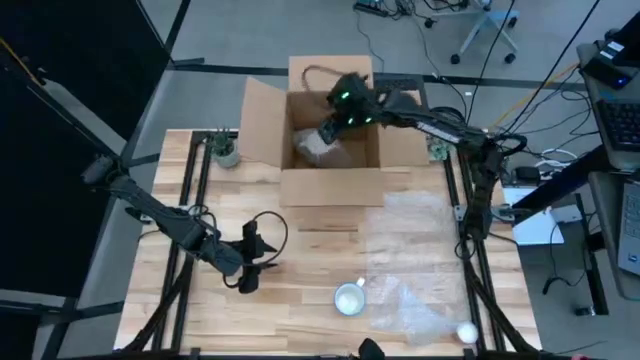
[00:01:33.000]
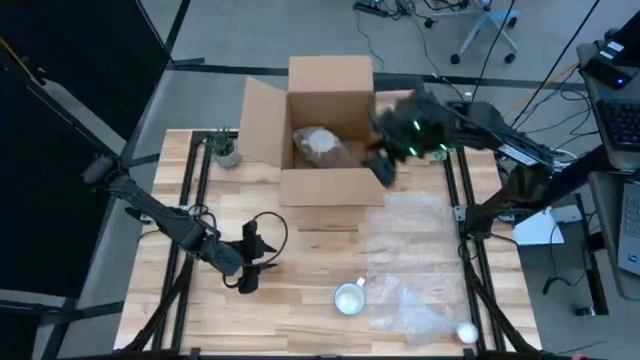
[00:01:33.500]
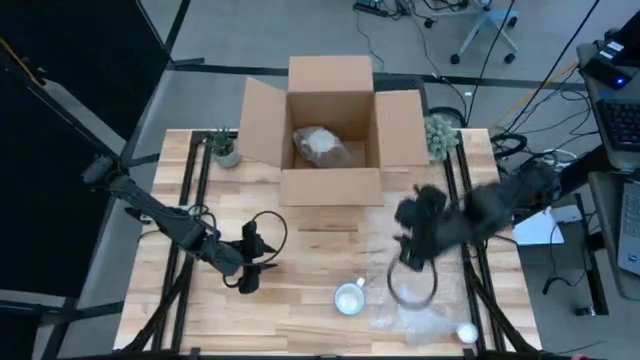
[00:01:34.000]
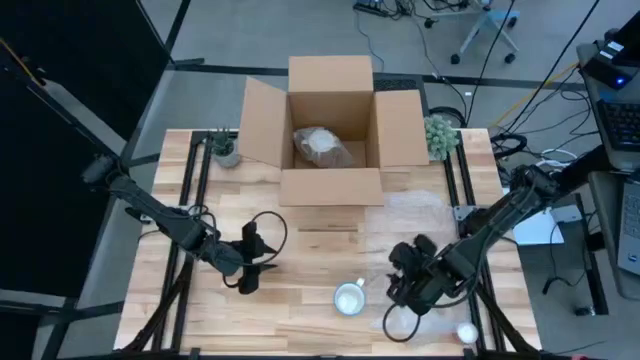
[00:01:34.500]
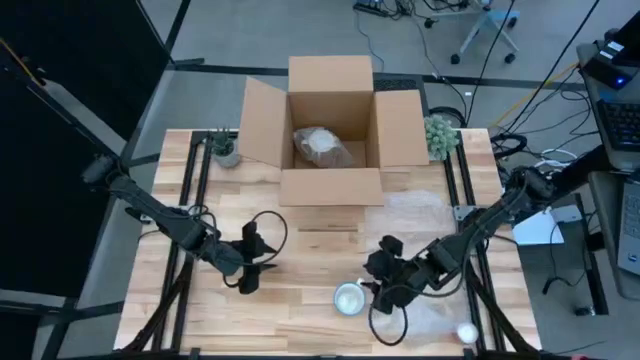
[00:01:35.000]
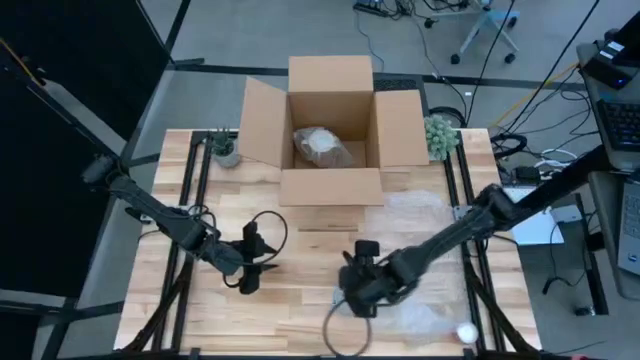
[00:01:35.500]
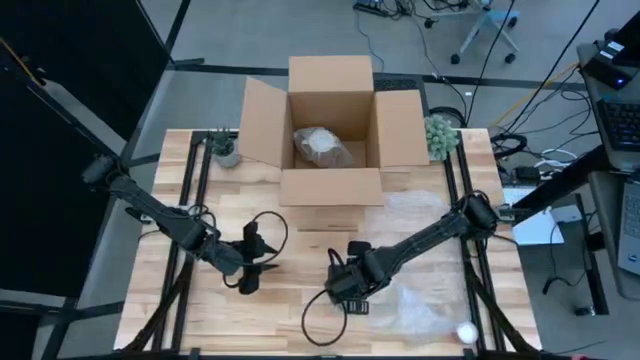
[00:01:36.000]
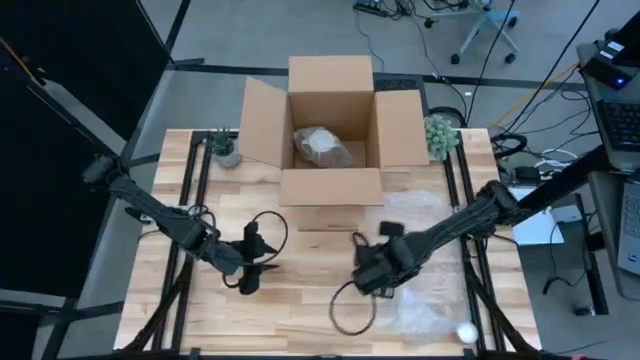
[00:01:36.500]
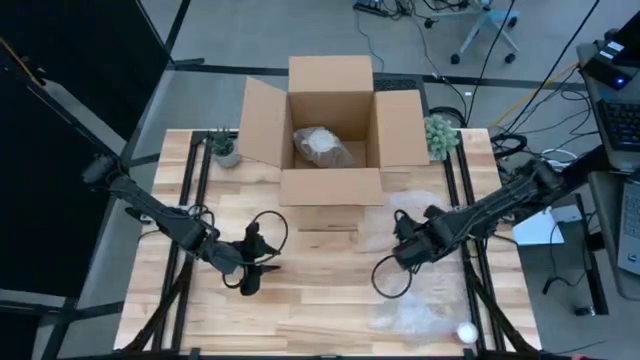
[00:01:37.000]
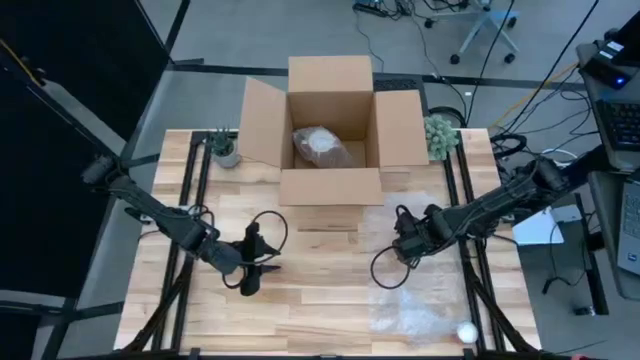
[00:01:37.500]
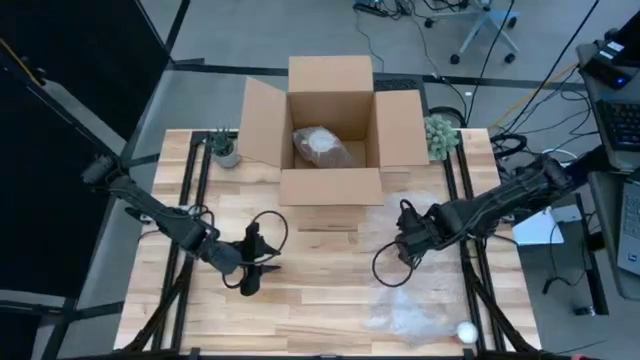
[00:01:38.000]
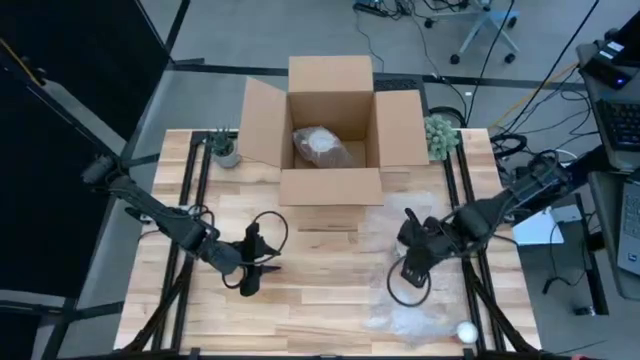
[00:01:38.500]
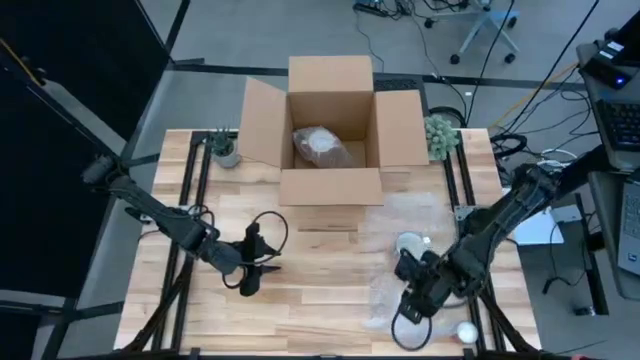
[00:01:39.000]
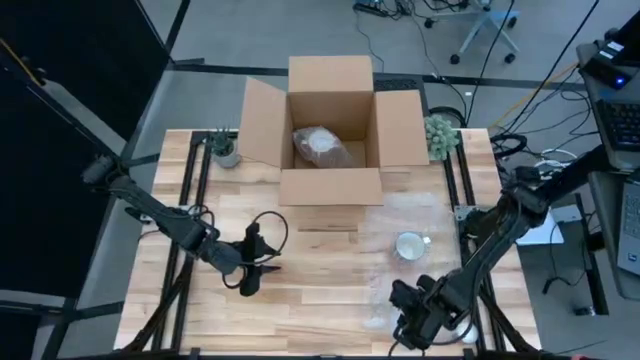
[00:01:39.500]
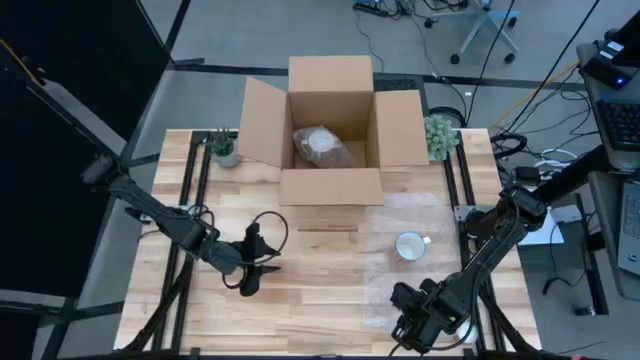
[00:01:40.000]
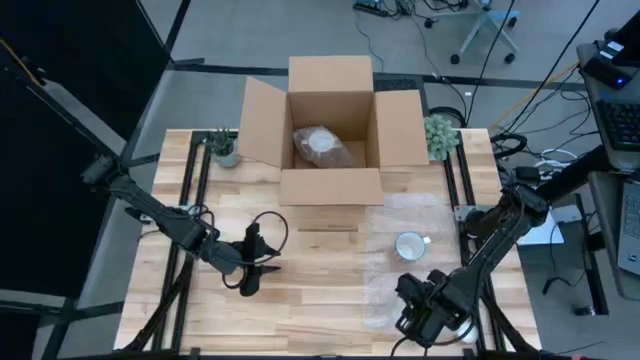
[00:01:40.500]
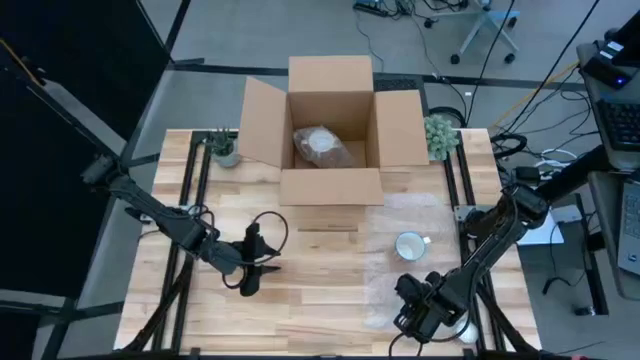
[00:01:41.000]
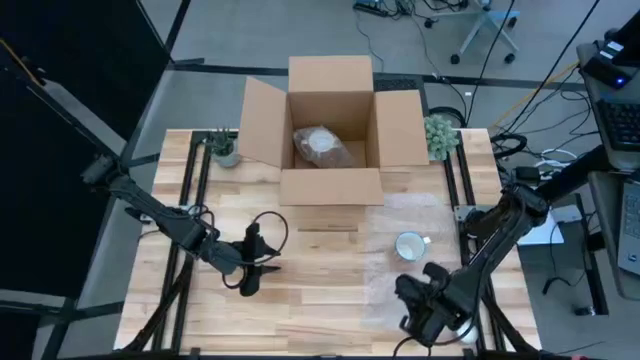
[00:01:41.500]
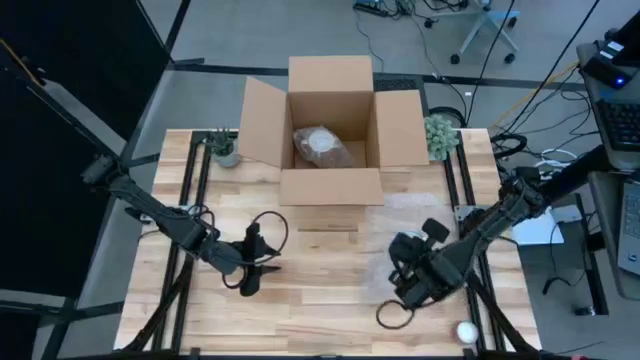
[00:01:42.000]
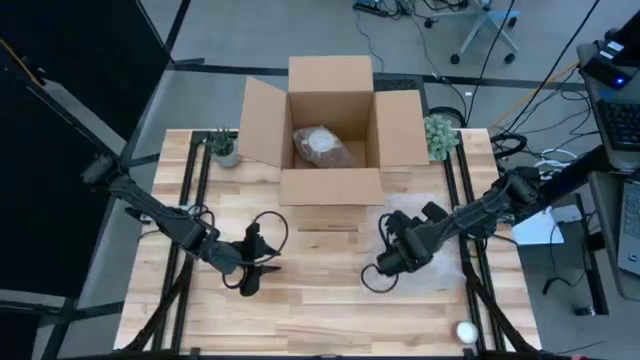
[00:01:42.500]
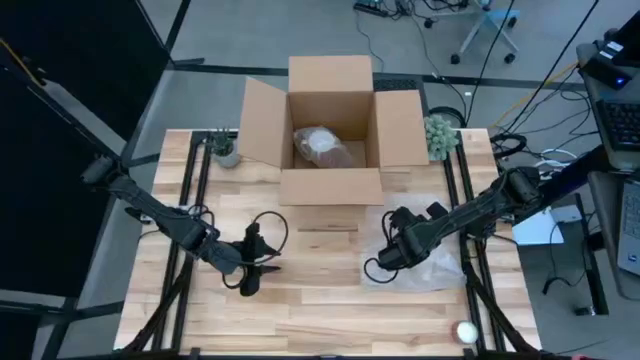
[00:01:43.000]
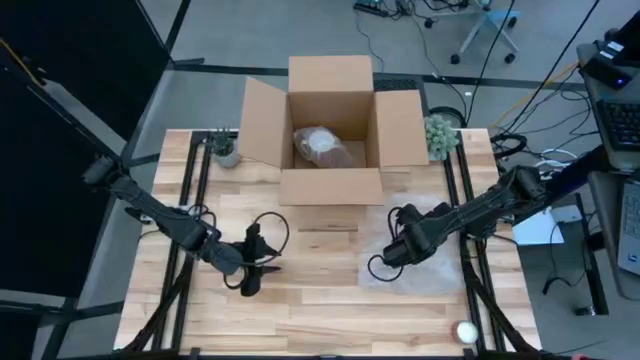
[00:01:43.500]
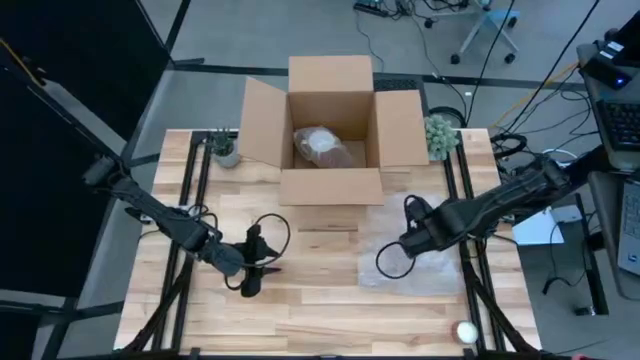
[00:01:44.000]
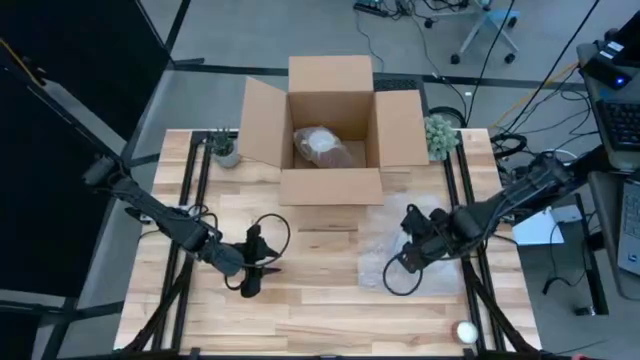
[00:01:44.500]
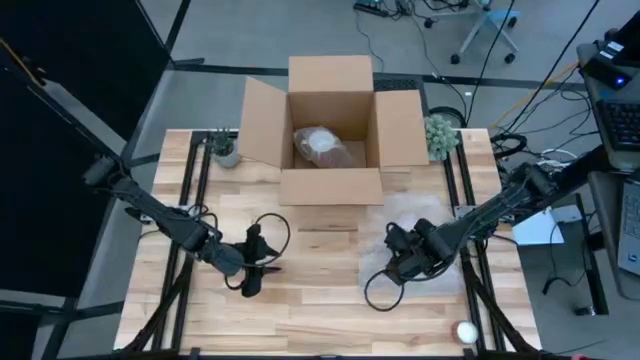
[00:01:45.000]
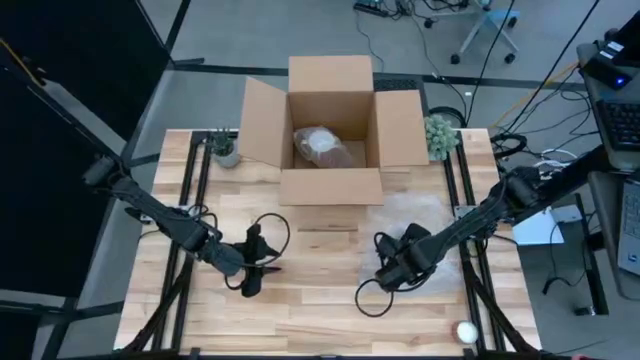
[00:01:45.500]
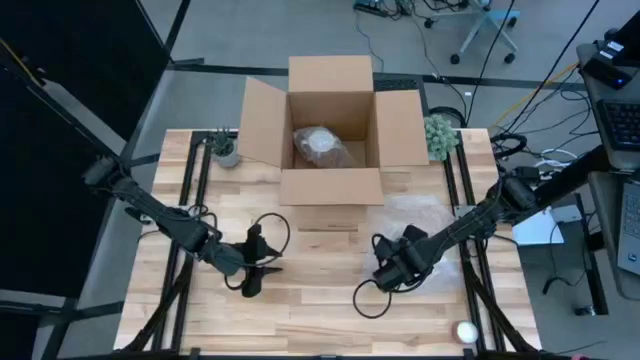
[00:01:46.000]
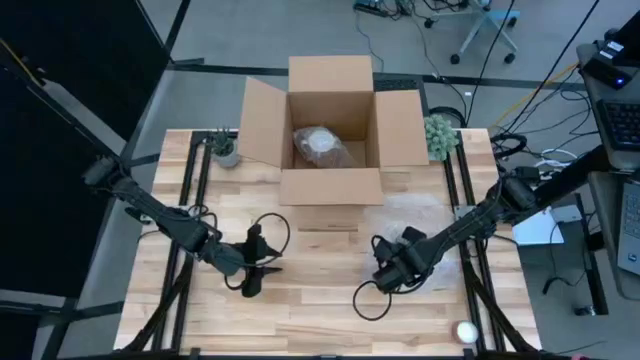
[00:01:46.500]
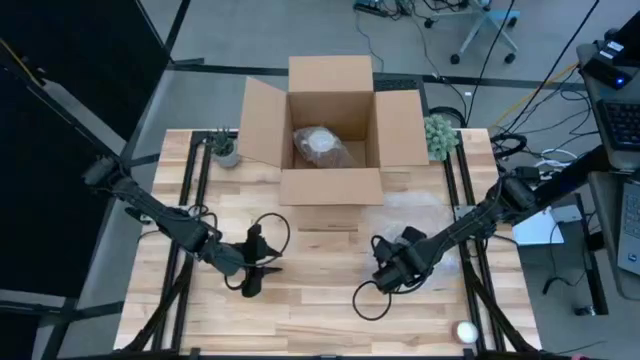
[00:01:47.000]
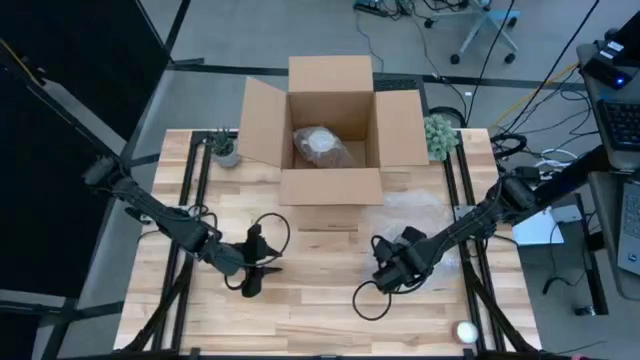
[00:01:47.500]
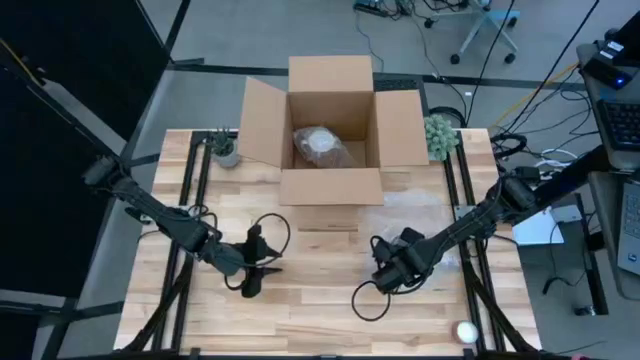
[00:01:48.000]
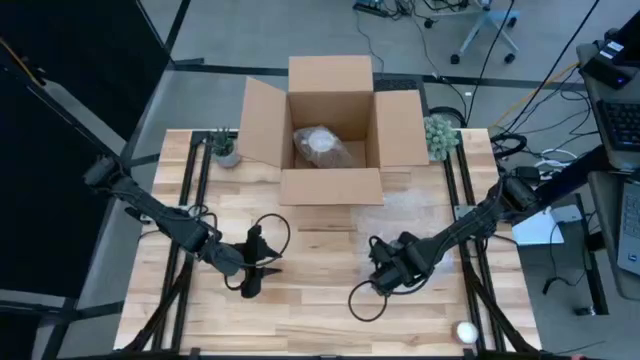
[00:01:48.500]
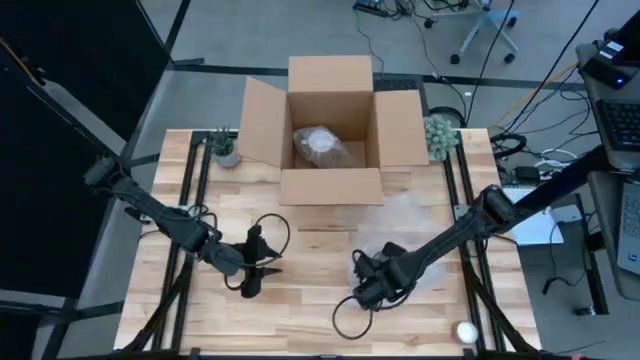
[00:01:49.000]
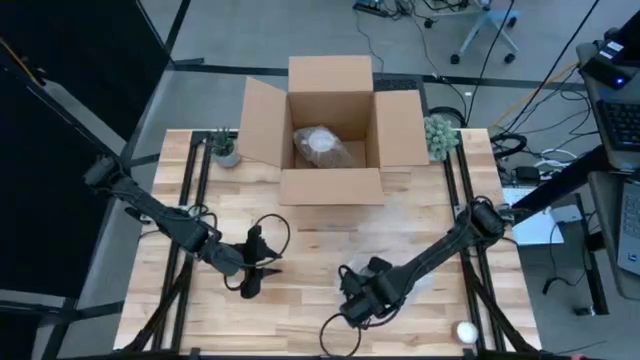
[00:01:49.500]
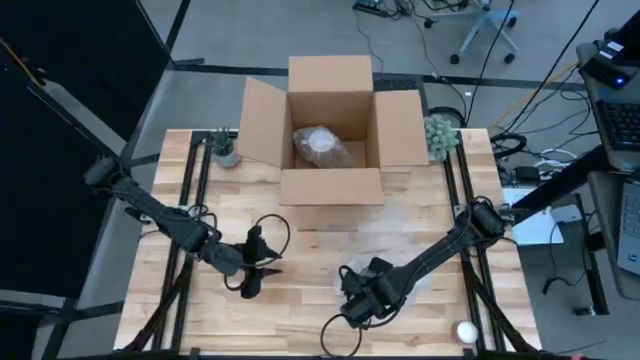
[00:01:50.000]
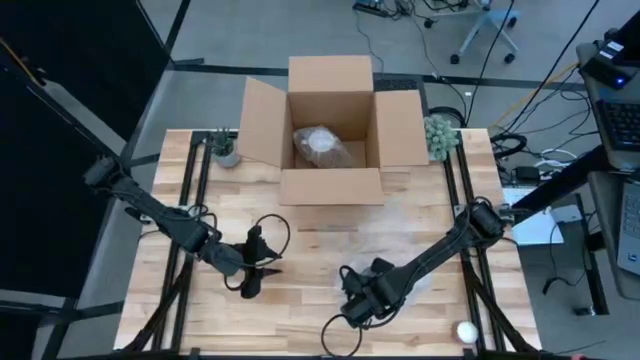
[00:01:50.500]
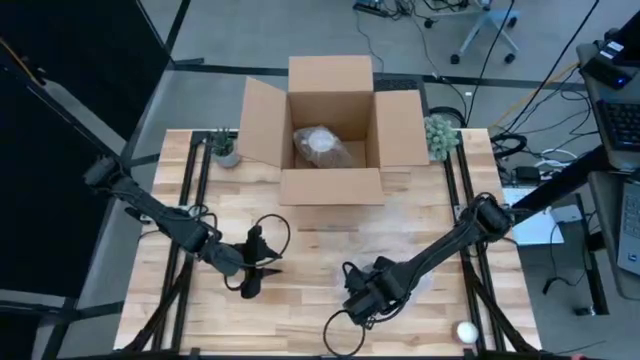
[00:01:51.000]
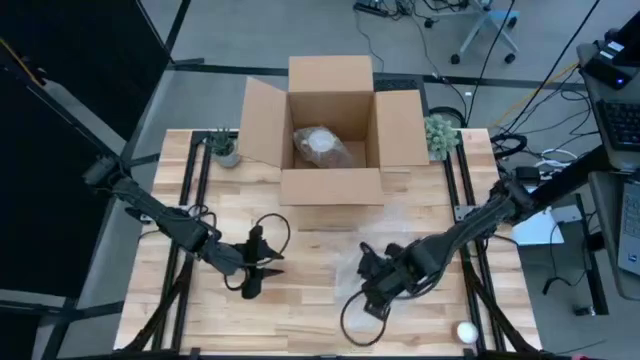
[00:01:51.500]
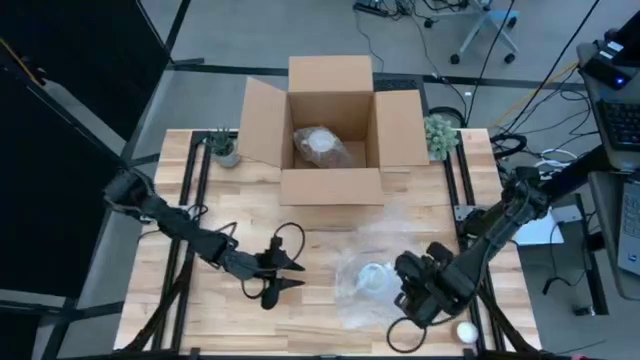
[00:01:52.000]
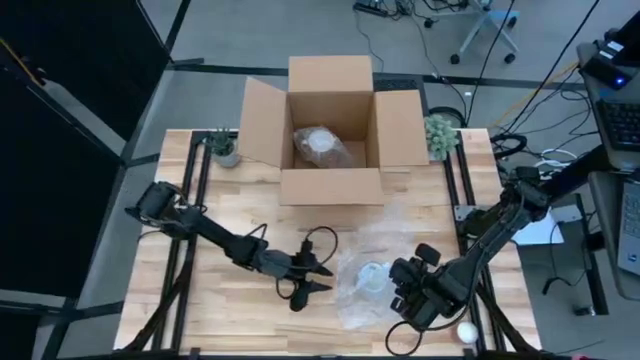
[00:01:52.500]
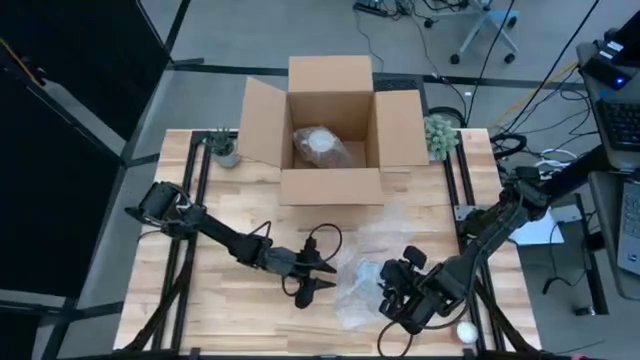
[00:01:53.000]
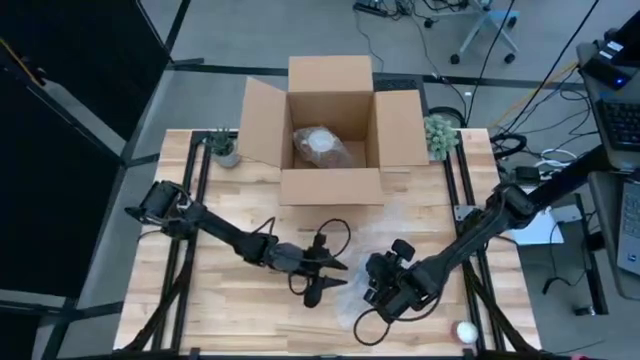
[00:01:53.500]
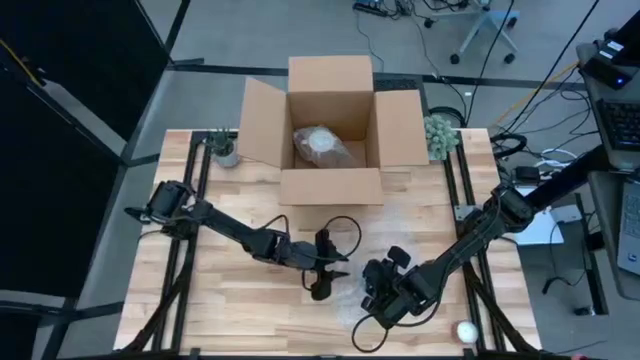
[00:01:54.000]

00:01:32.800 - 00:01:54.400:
Task: wrap mug
Wrap the red mug with the bubble wrap
